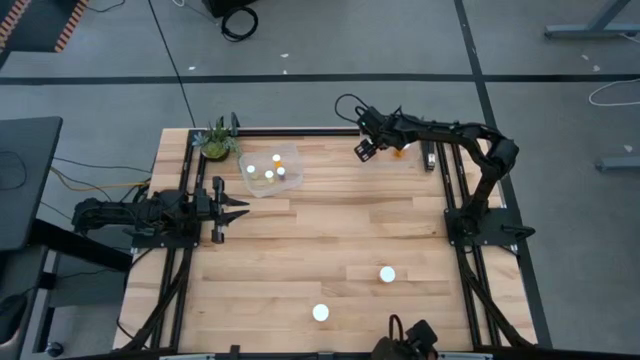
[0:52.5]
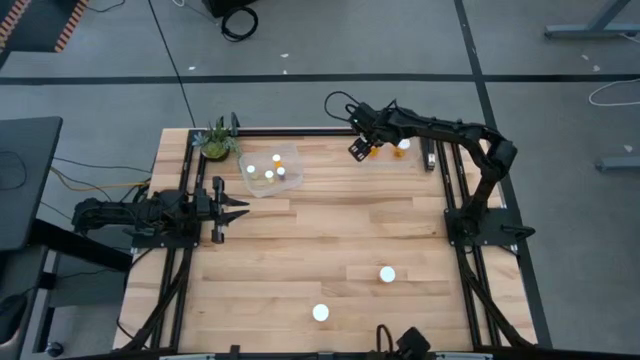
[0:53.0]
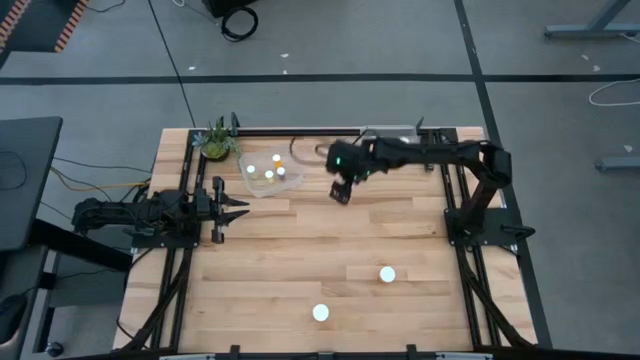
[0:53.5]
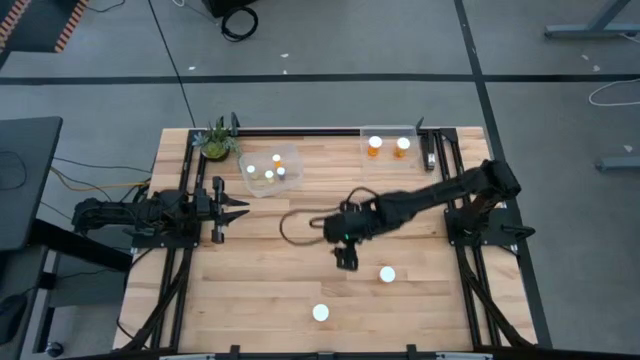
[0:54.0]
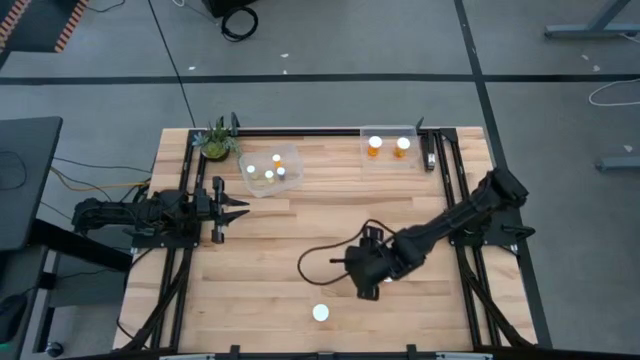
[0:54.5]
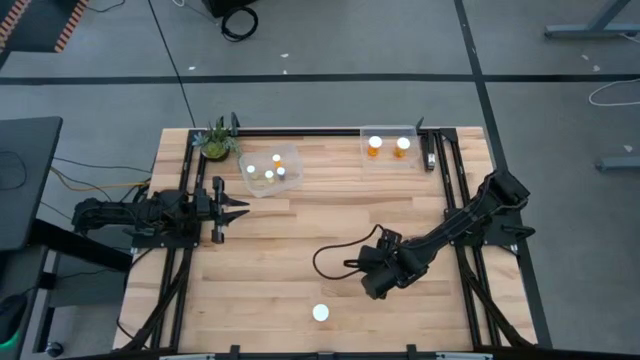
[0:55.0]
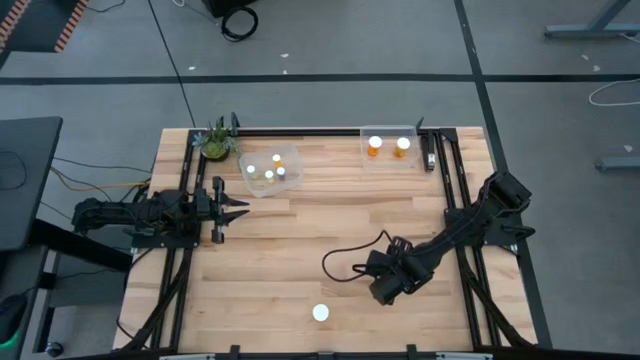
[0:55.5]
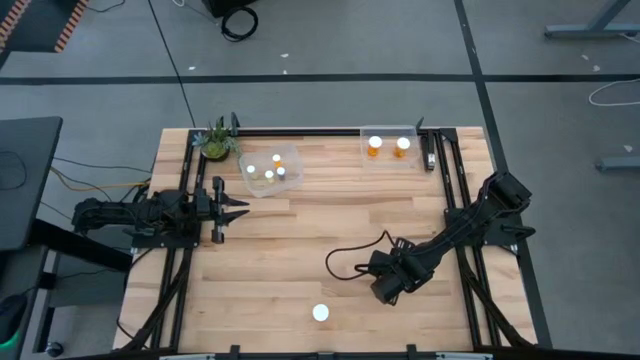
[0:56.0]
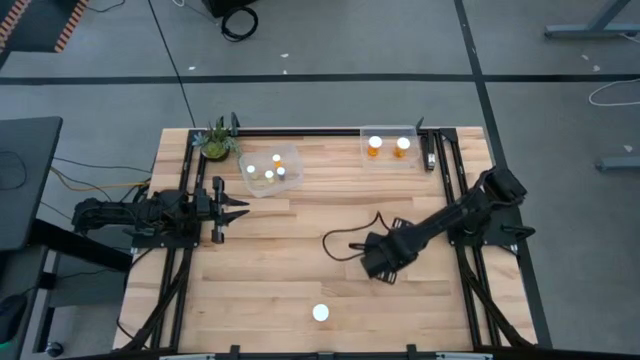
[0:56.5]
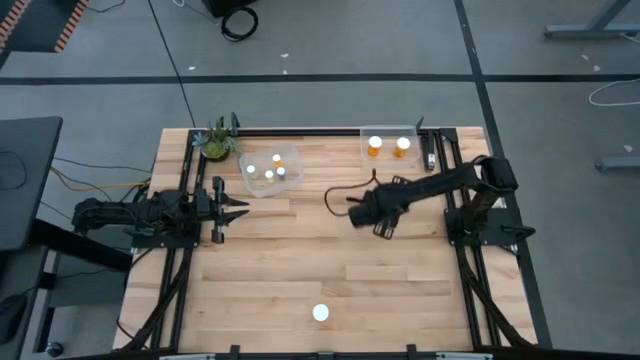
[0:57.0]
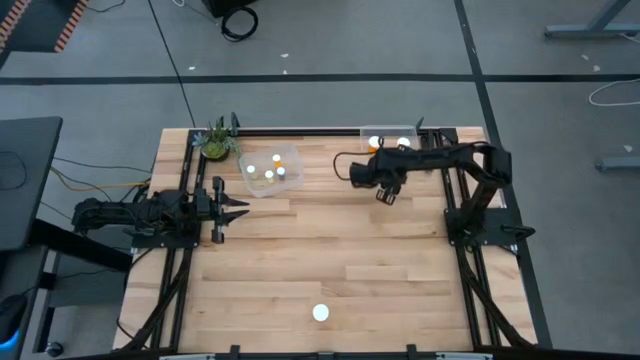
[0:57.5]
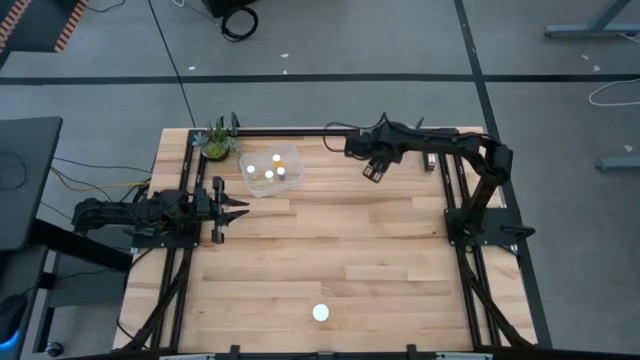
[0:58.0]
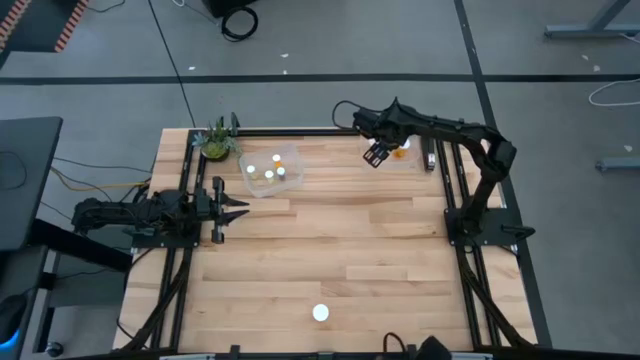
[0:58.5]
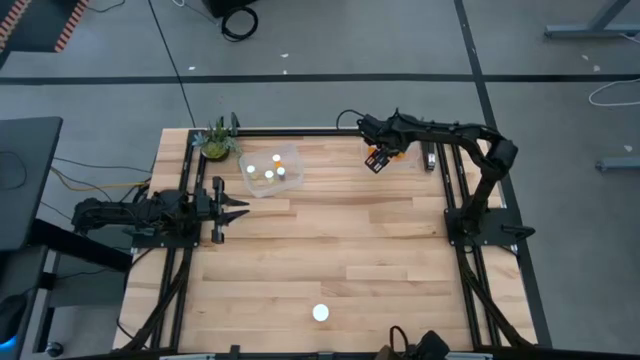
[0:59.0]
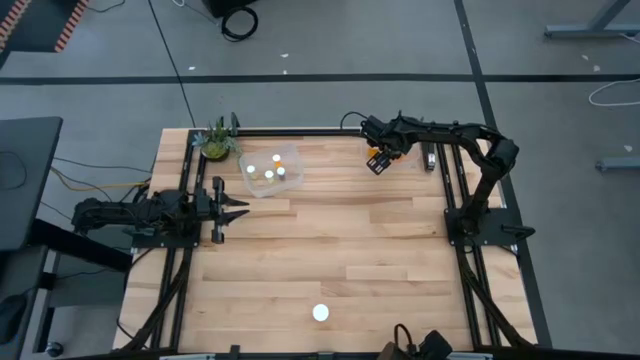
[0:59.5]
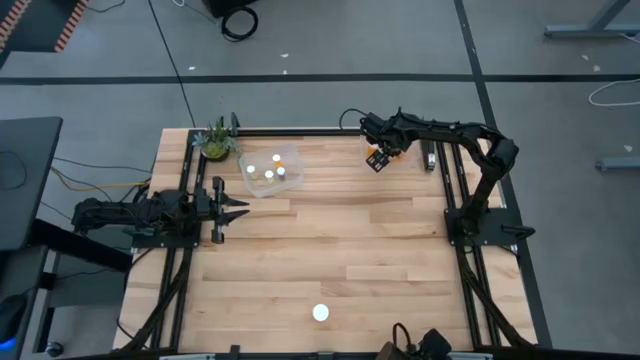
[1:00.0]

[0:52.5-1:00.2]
Task: Pick and place medicine bottles into bin by pill shape (circle, oval)
Put the large orange pill bottle into the right transparent bin

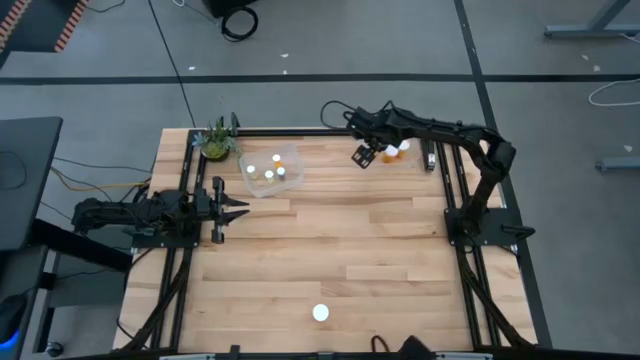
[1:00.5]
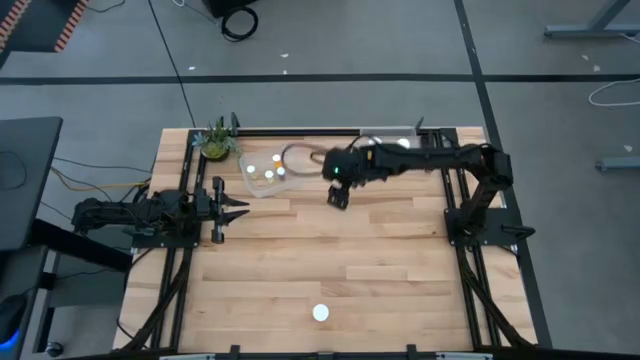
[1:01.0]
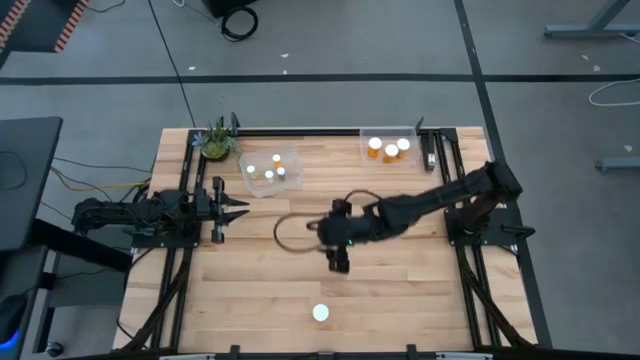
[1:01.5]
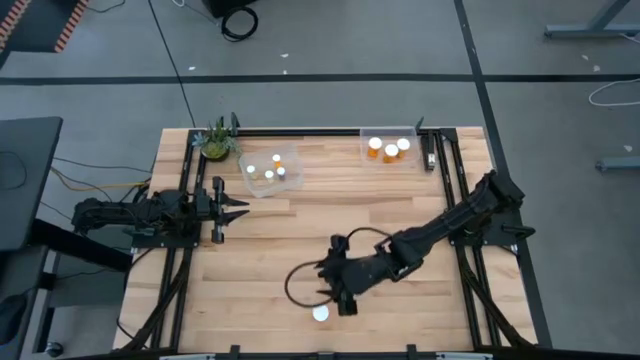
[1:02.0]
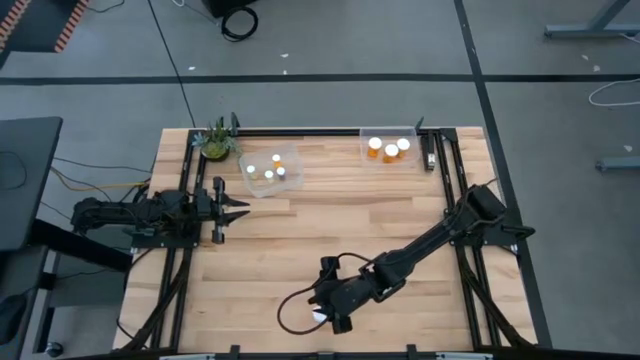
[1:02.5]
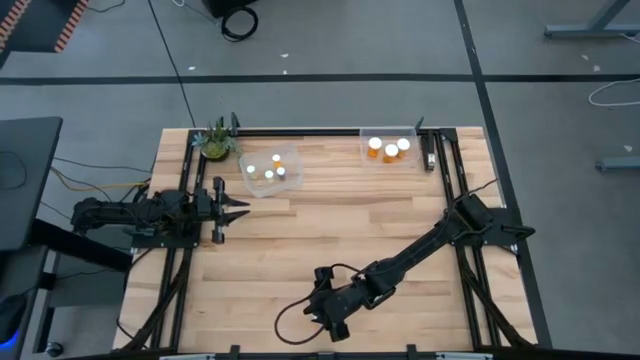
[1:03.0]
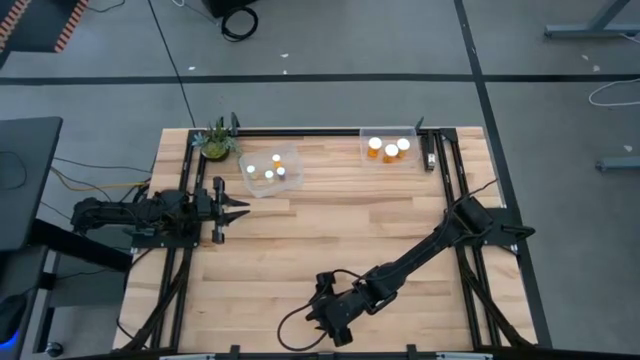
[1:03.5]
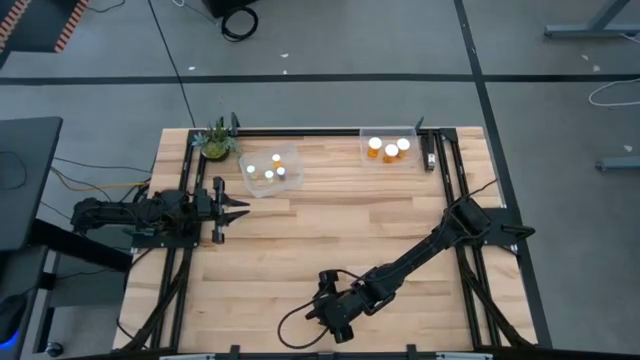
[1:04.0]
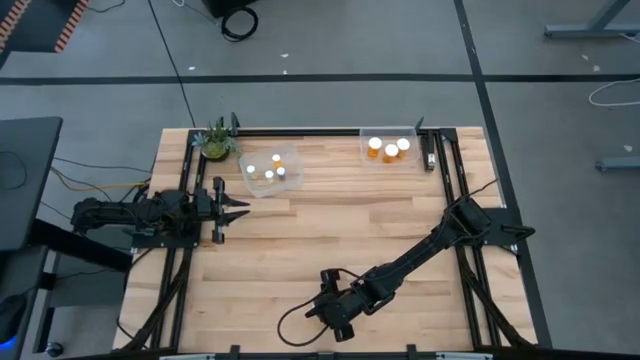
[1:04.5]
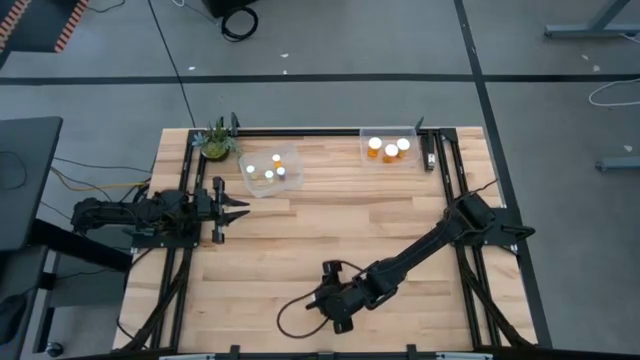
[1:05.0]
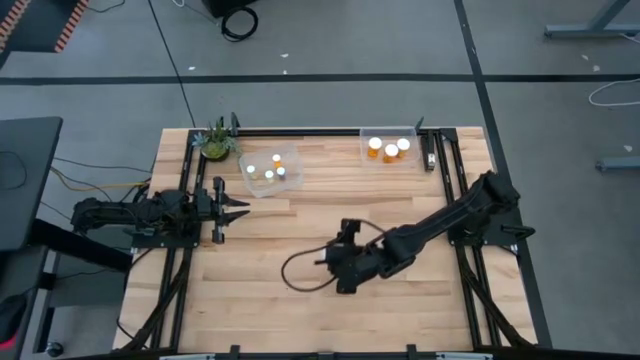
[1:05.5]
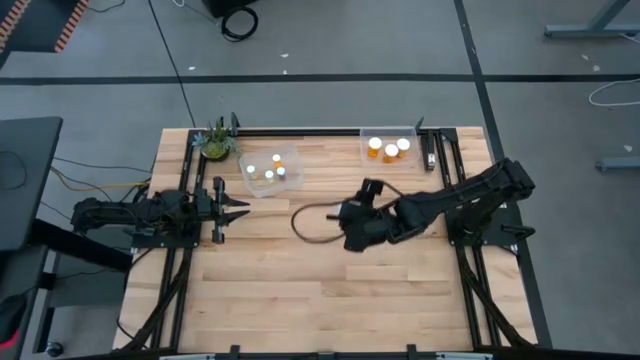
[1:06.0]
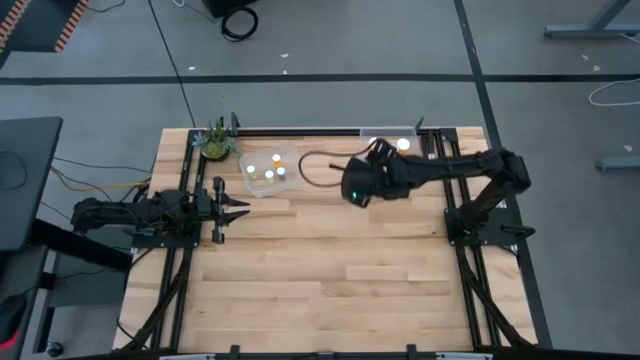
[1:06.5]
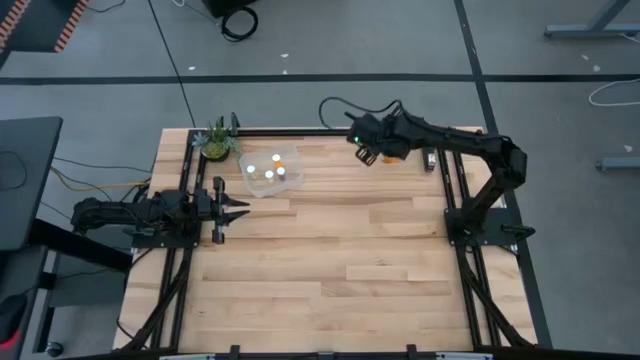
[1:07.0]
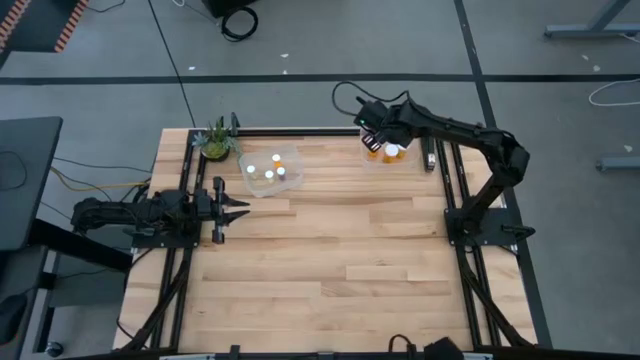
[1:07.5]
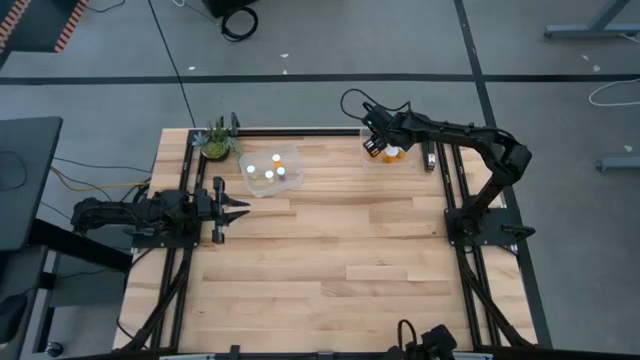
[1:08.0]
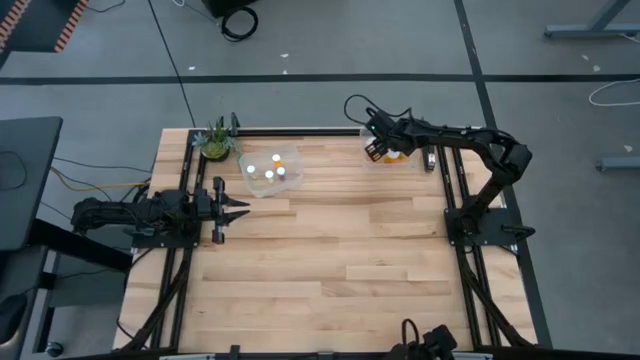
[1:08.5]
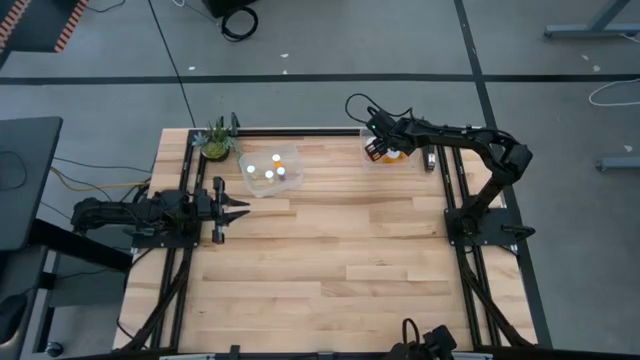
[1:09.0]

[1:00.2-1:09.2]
Put the large orange pill bottle into the right transparent bin

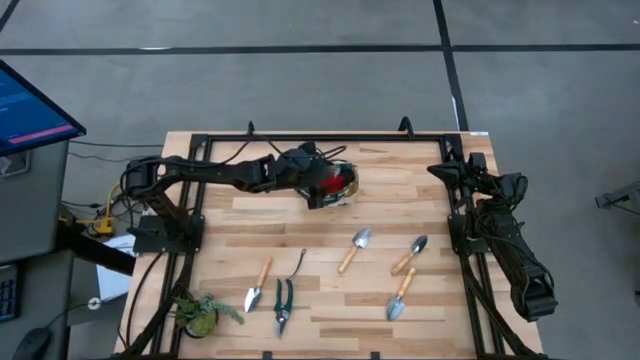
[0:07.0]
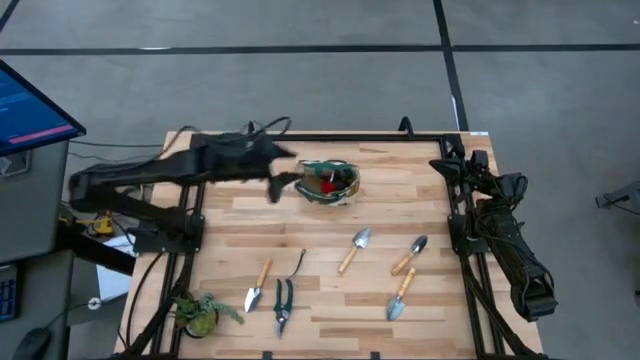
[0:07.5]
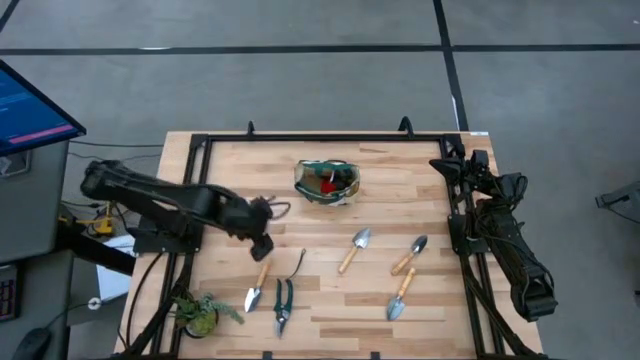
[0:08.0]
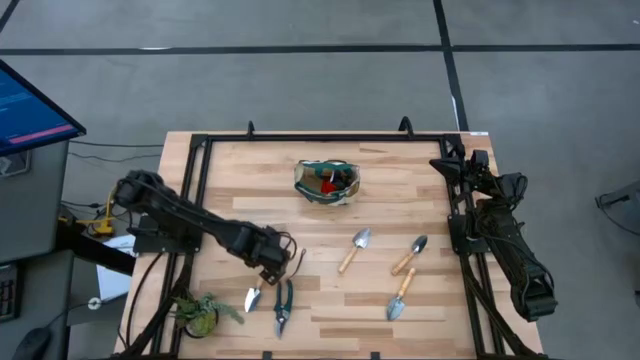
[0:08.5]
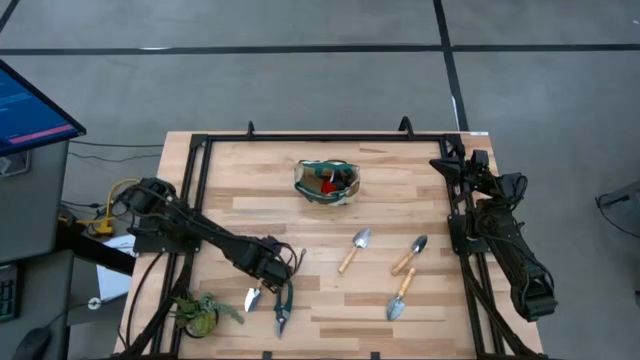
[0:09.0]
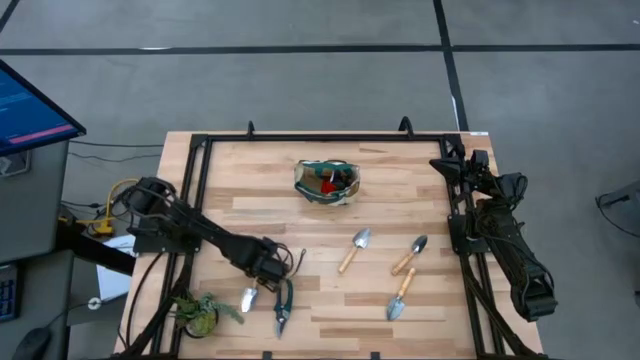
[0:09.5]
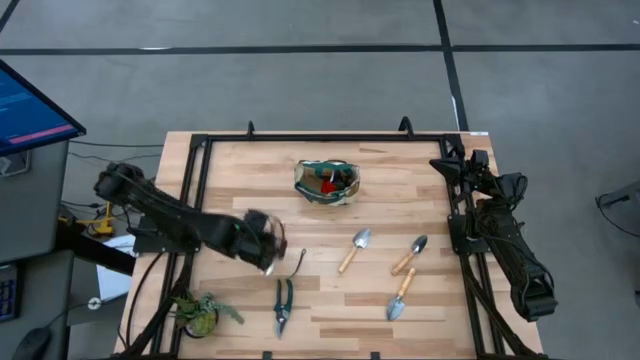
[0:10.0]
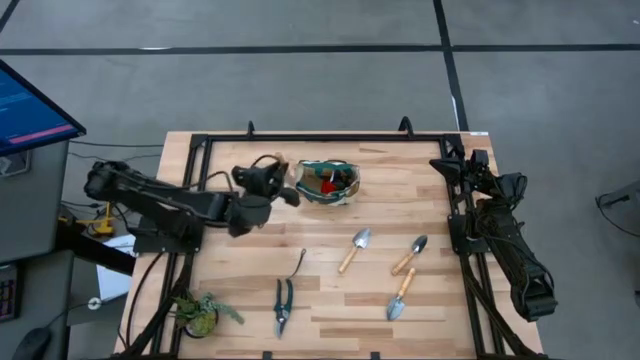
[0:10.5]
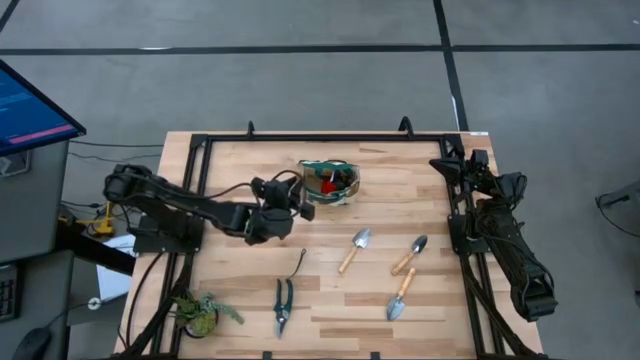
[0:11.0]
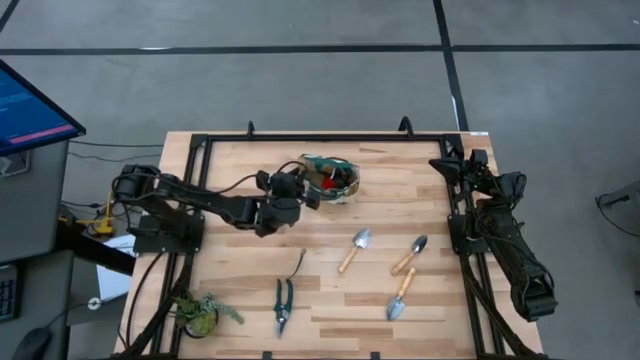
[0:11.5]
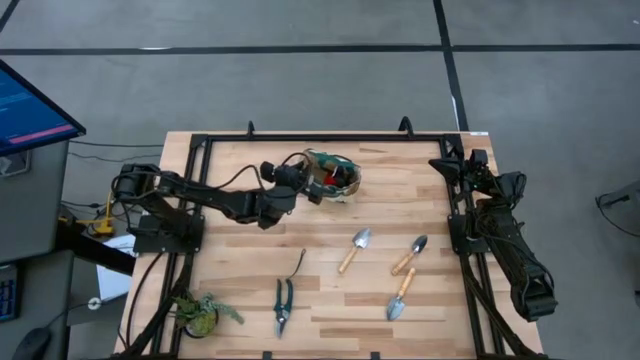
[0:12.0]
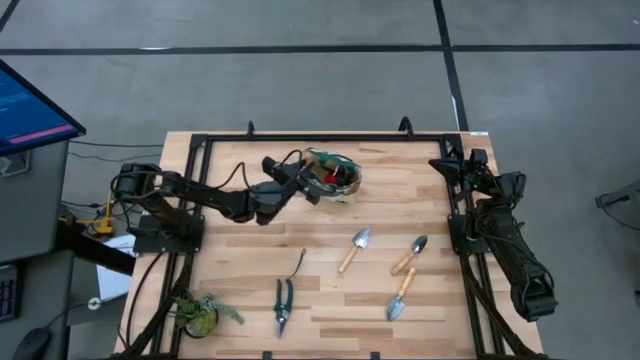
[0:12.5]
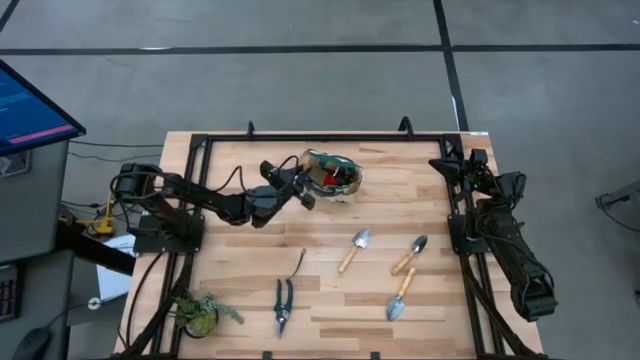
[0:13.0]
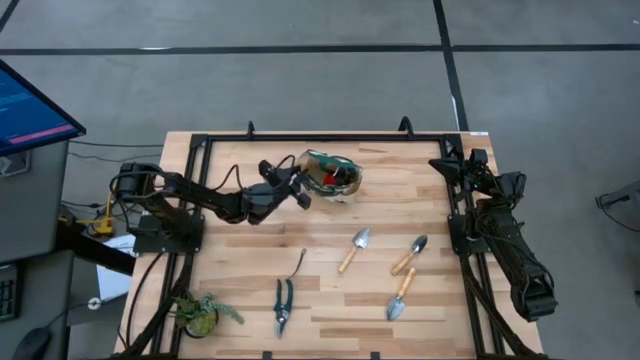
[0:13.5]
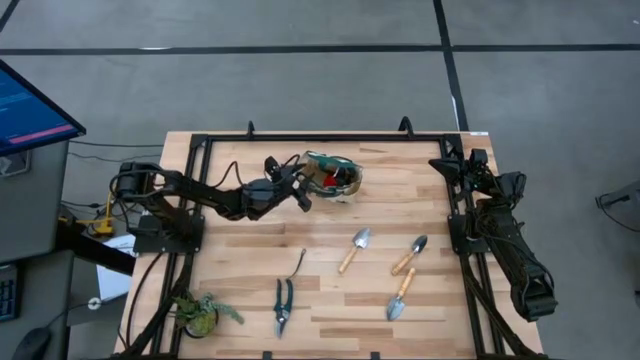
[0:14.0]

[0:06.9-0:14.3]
Task: Pick & Place Garden tools in Gardening bag
Put the brown trowel into the white gardening bag
